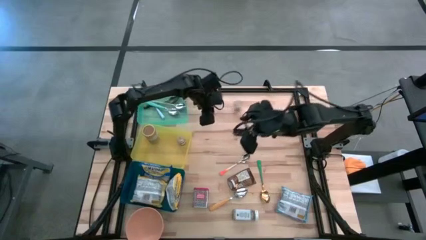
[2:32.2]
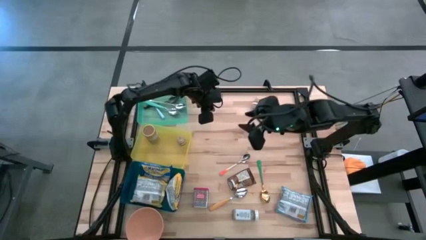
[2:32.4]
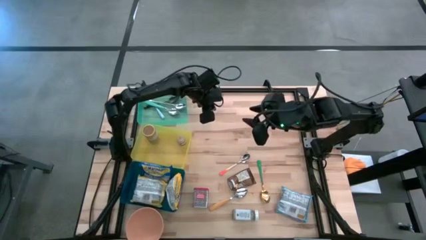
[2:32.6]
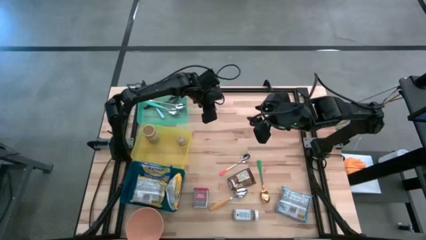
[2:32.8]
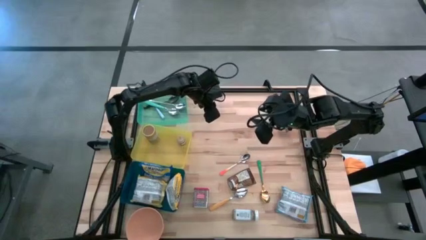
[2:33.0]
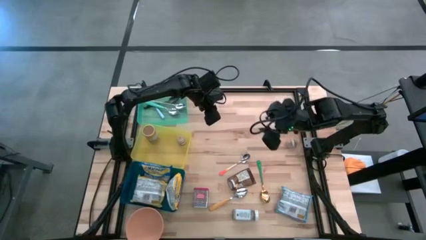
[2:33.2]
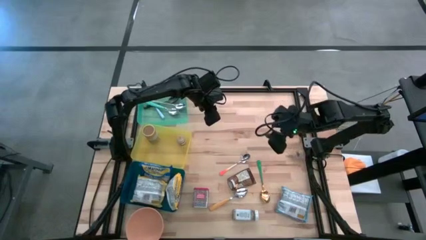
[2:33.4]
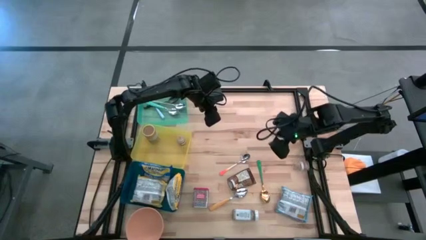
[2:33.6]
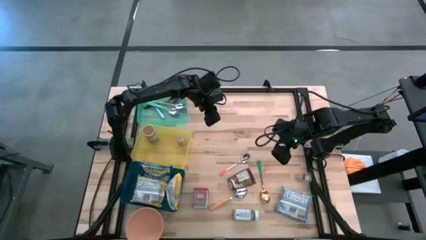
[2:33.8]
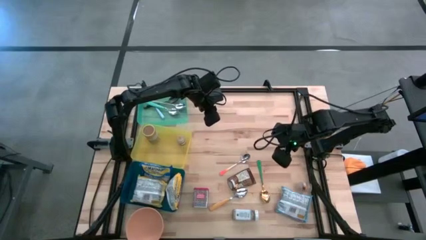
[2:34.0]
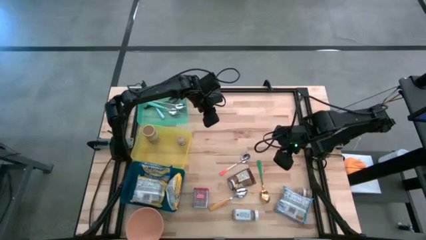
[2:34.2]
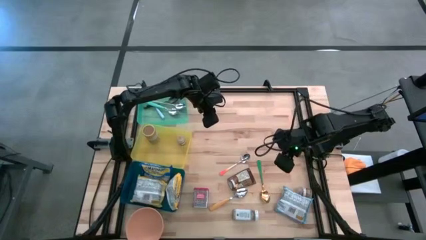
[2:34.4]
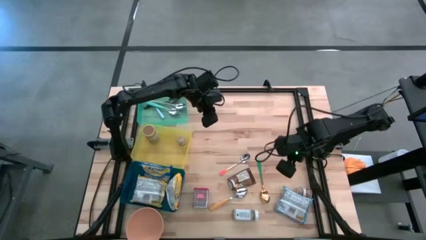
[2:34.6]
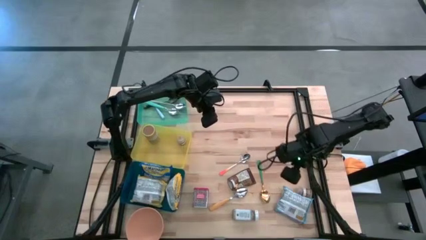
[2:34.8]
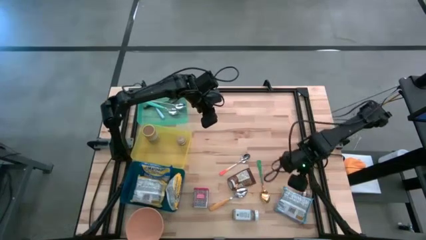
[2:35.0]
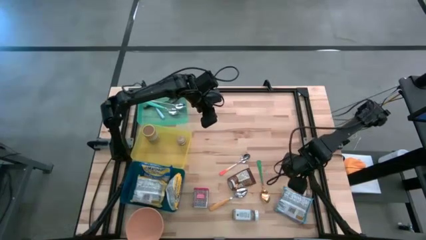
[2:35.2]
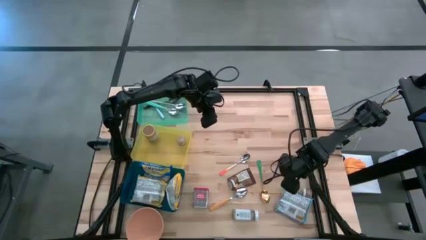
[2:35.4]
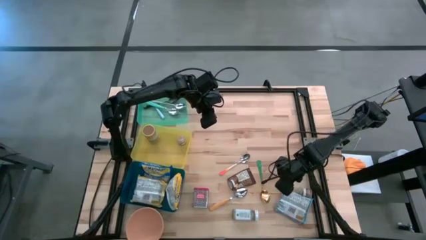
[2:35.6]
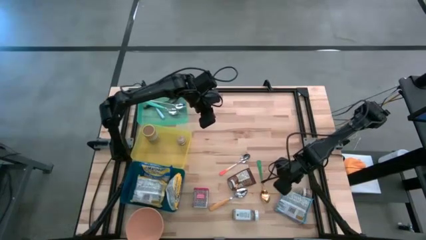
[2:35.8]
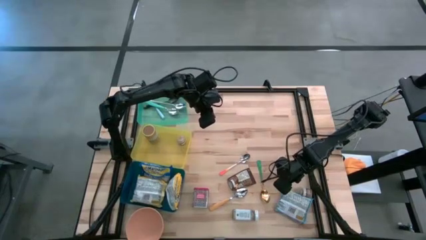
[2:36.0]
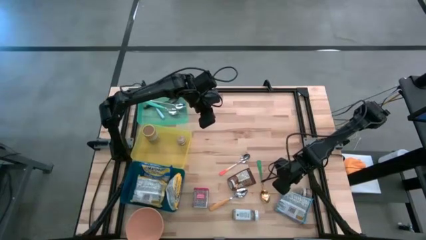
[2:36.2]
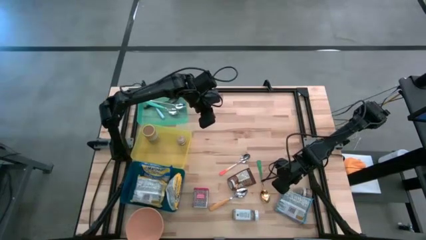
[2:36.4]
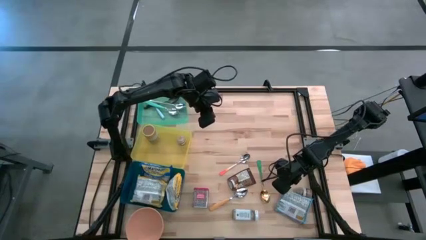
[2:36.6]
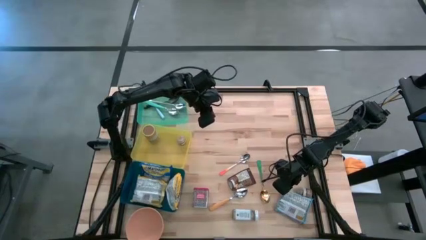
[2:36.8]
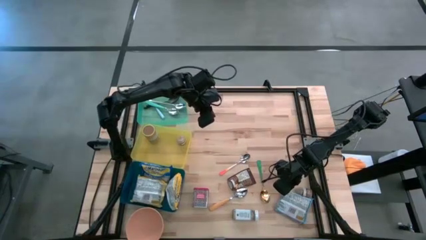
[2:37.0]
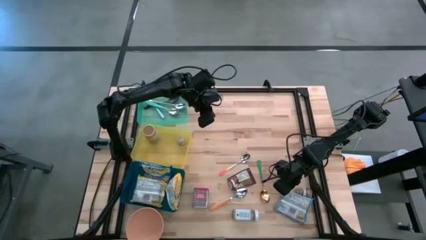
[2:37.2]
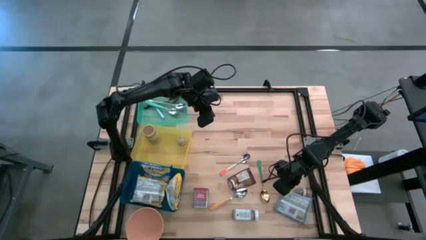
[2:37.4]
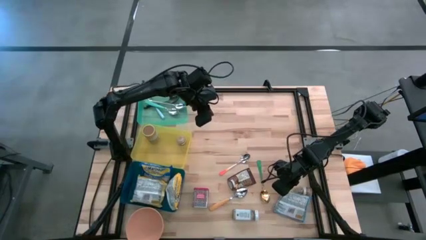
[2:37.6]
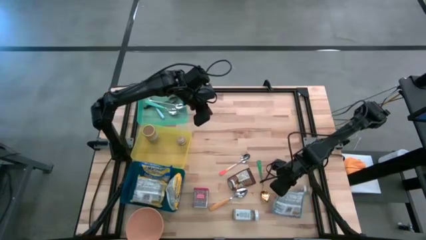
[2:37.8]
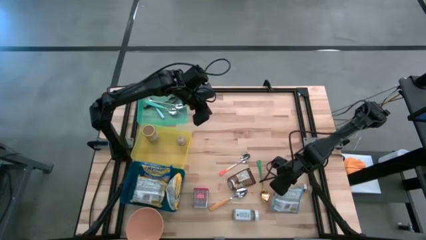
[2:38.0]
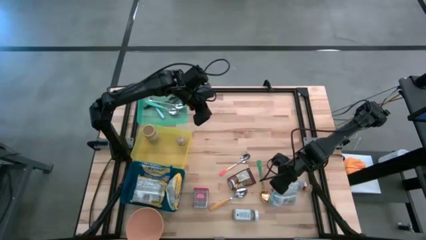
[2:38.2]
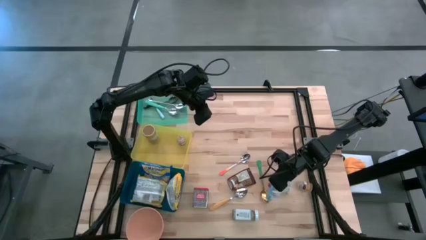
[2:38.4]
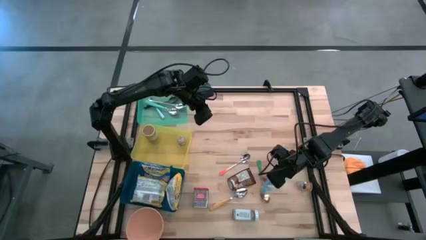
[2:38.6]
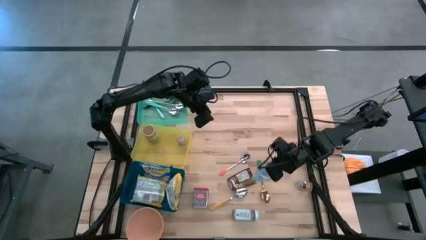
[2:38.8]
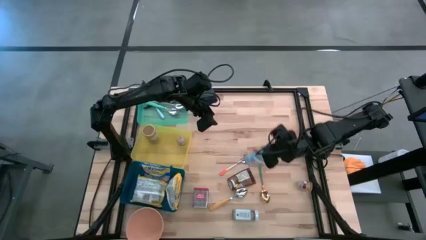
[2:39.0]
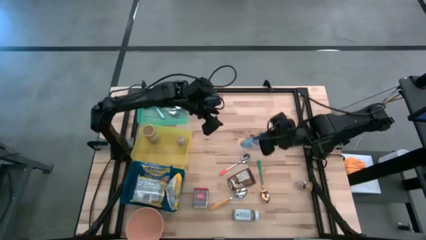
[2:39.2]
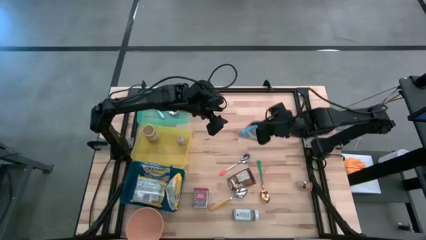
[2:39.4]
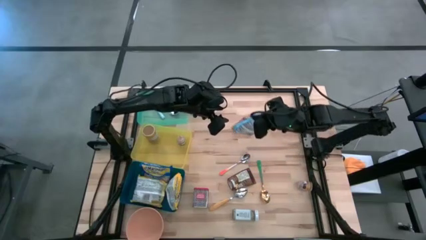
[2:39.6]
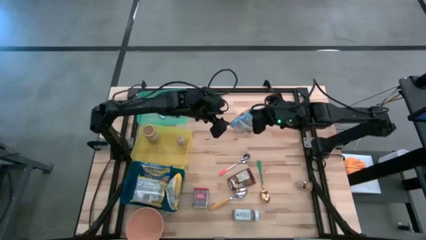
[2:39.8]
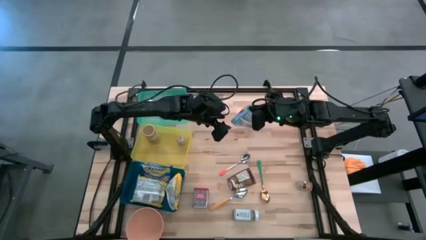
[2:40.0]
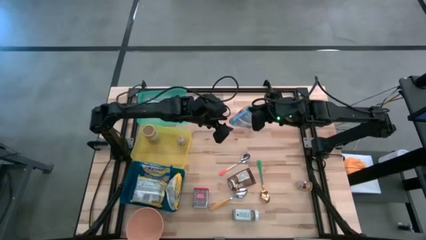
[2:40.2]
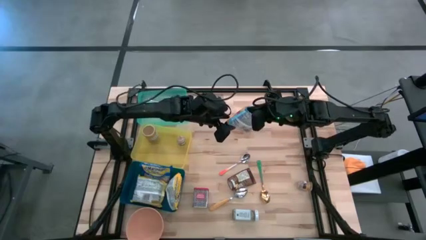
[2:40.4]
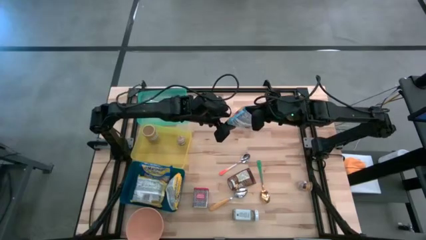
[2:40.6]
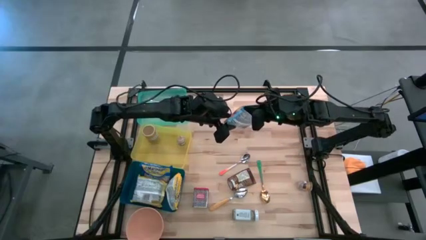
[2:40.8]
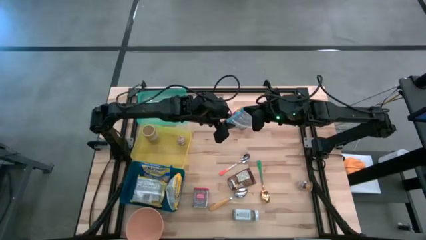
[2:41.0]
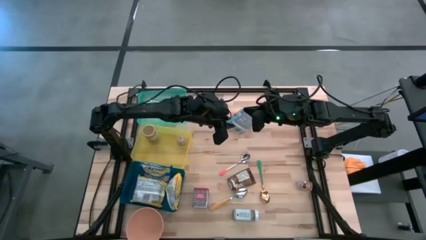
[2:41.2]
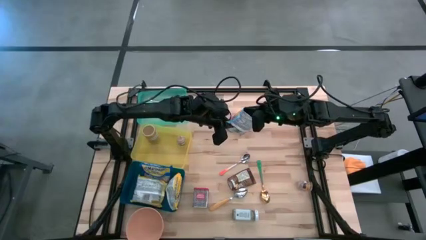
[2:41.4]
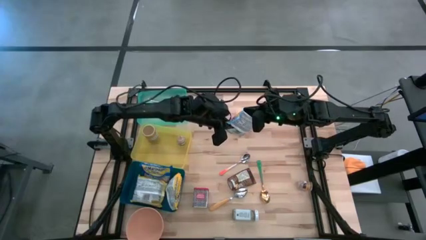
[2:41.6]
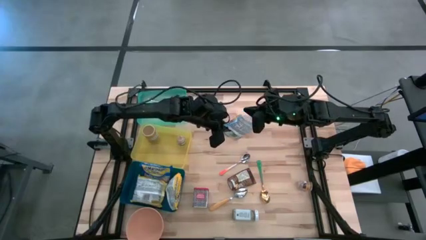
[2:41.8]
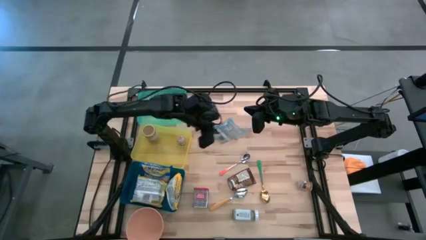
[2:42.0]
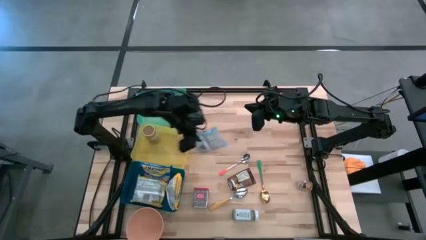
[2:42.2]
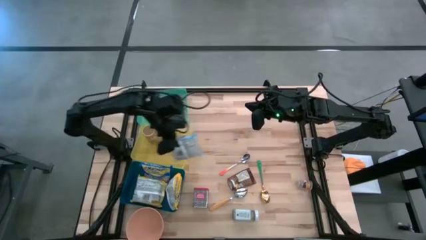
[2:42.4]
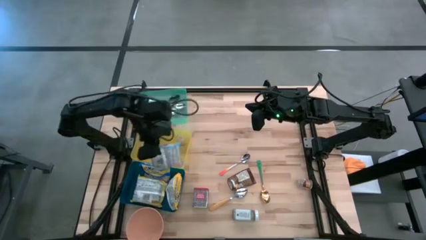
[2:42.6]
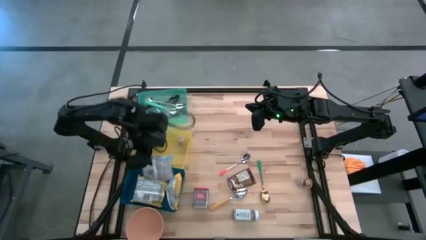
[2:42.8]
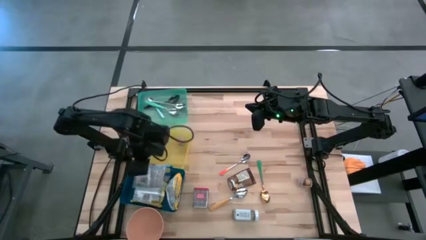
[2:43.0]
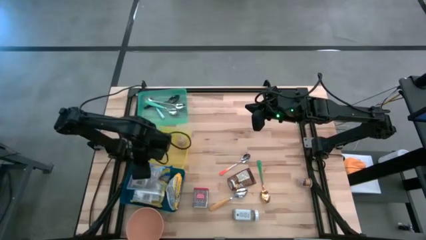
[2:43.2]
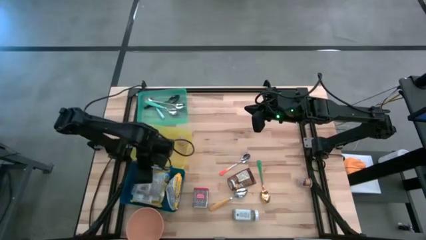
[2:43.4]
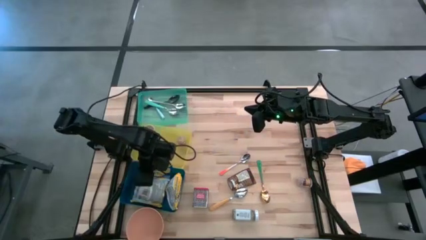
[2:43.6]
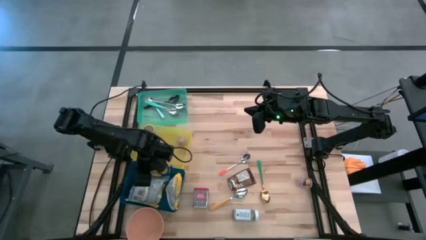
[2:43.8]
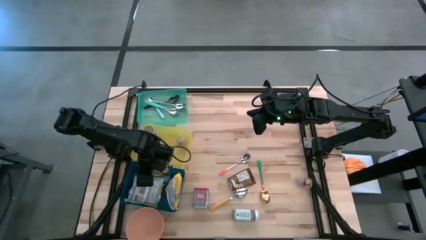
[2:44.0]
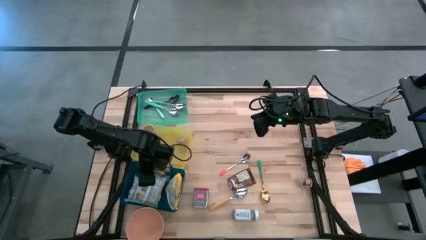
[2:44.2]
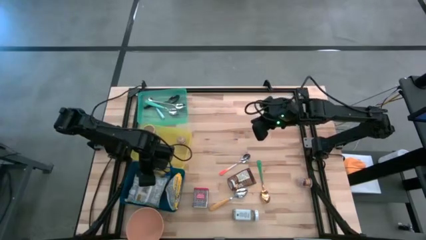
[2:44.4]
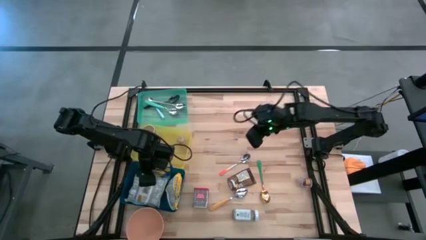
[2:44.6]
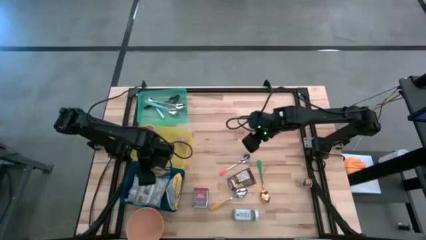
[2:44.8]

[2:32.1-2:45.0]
Put the light blue noodle pack into the blue bin
